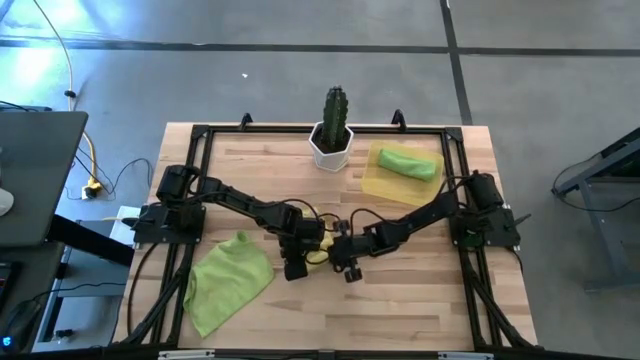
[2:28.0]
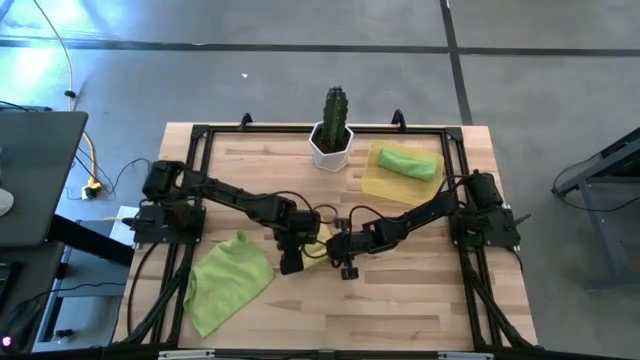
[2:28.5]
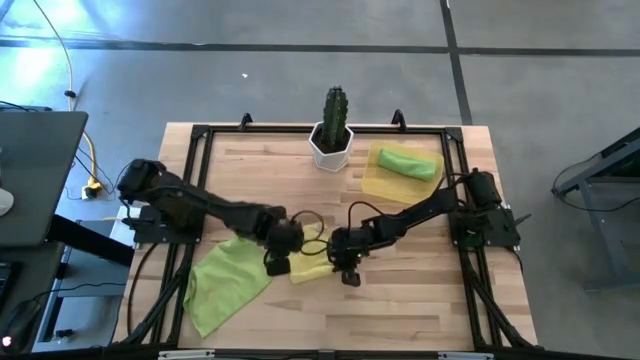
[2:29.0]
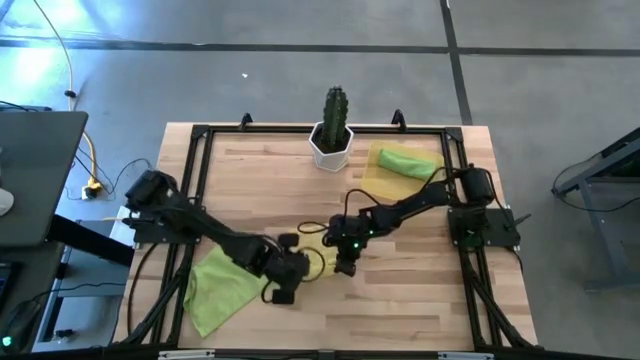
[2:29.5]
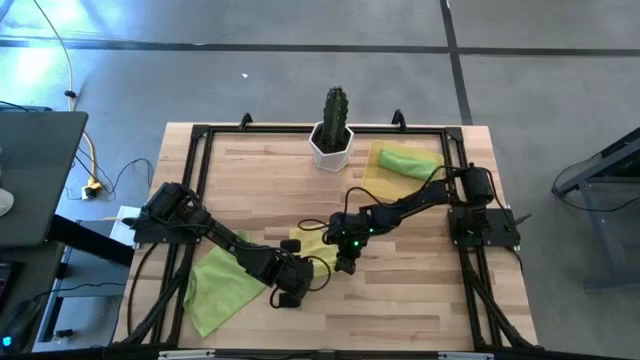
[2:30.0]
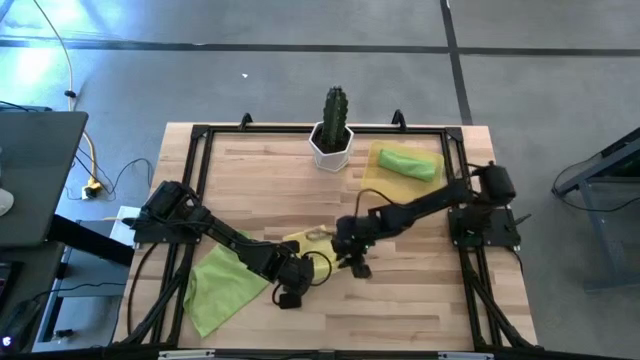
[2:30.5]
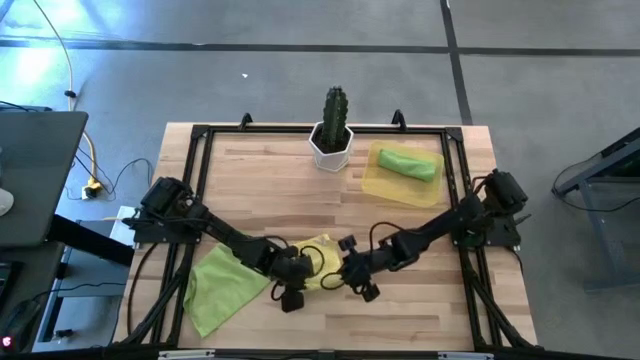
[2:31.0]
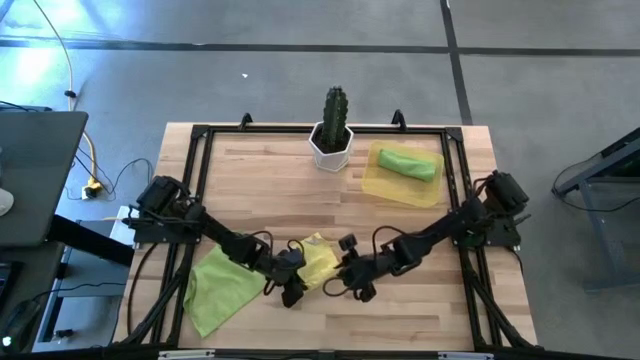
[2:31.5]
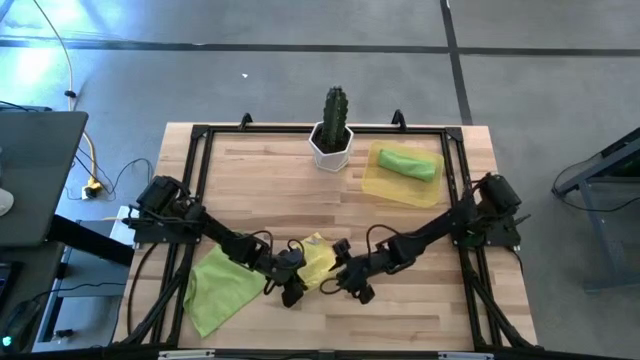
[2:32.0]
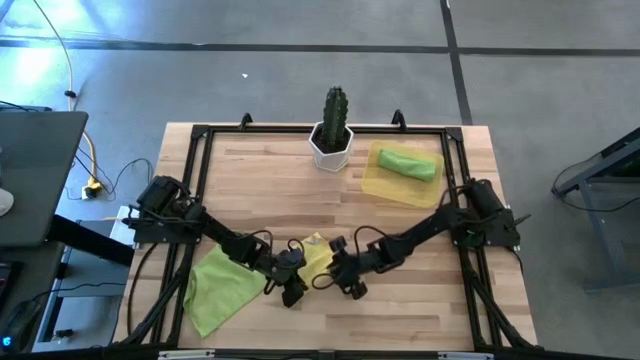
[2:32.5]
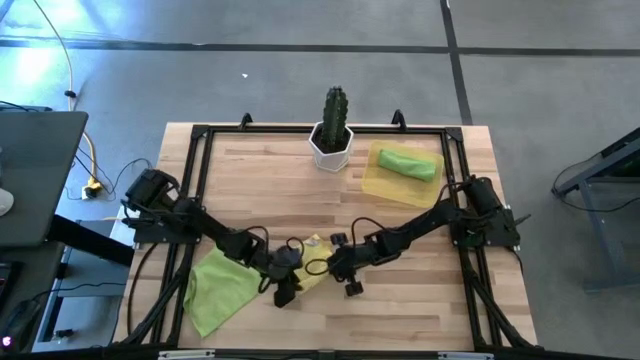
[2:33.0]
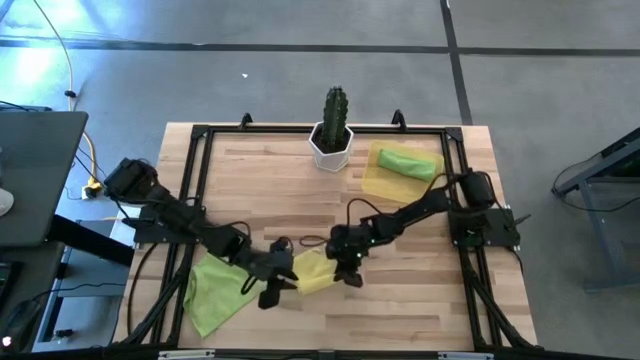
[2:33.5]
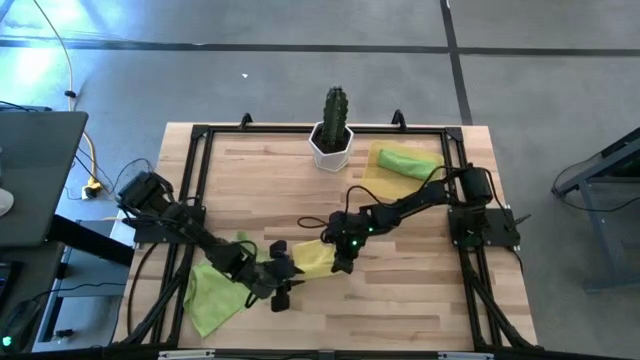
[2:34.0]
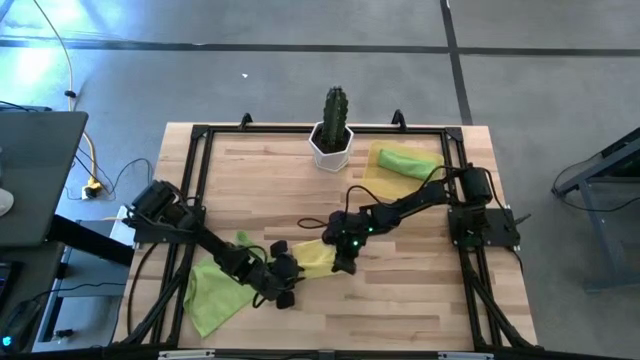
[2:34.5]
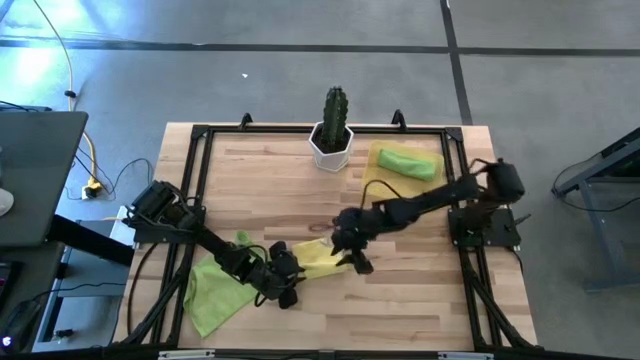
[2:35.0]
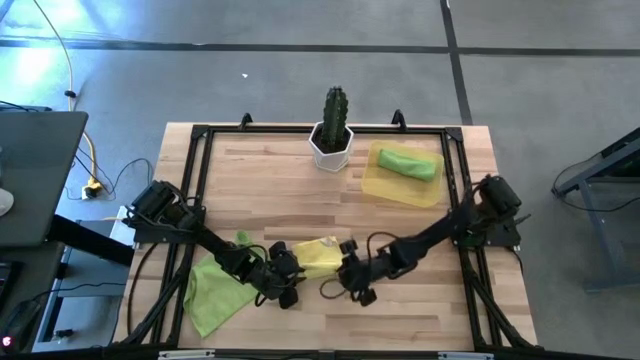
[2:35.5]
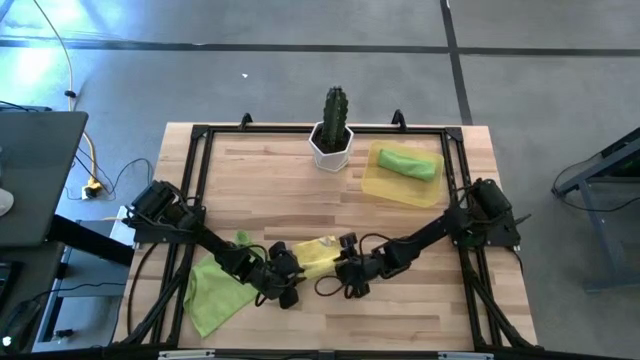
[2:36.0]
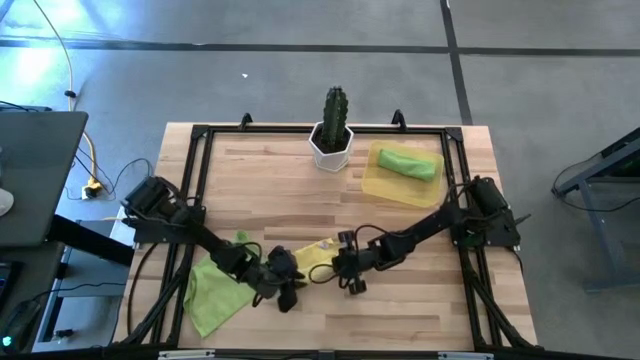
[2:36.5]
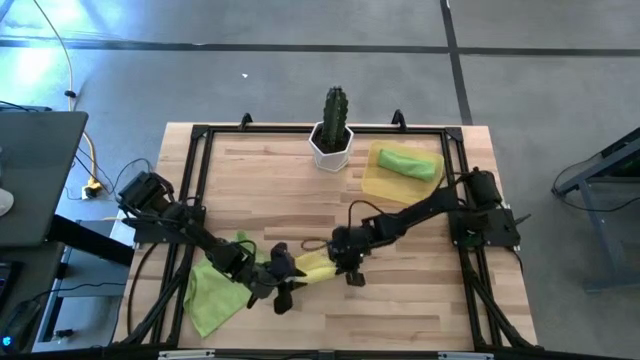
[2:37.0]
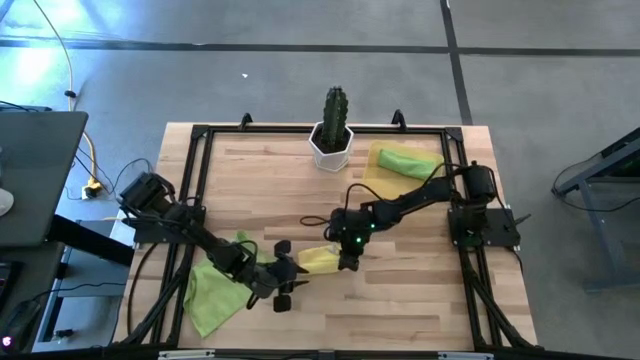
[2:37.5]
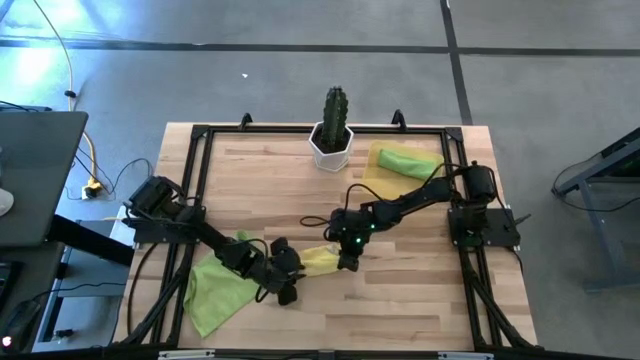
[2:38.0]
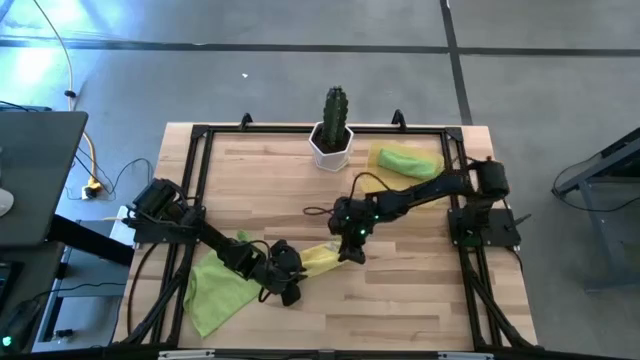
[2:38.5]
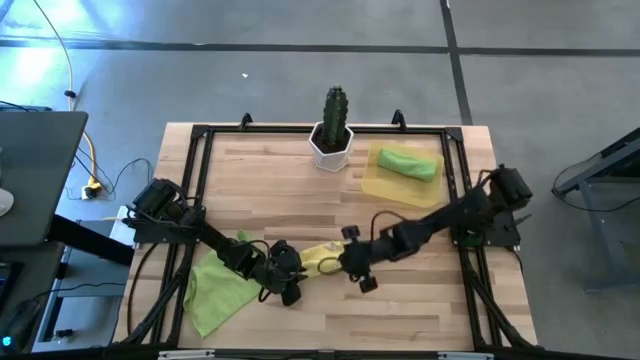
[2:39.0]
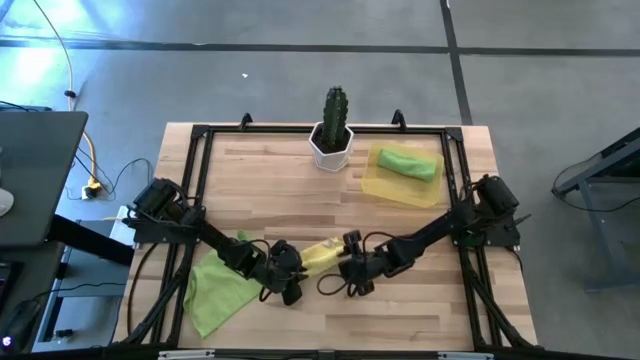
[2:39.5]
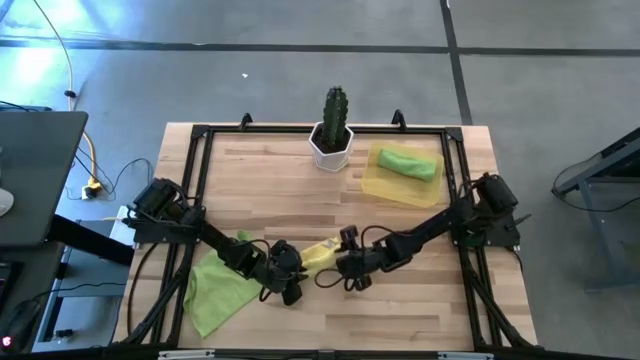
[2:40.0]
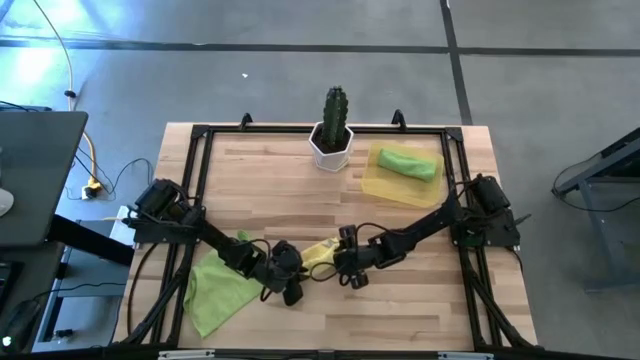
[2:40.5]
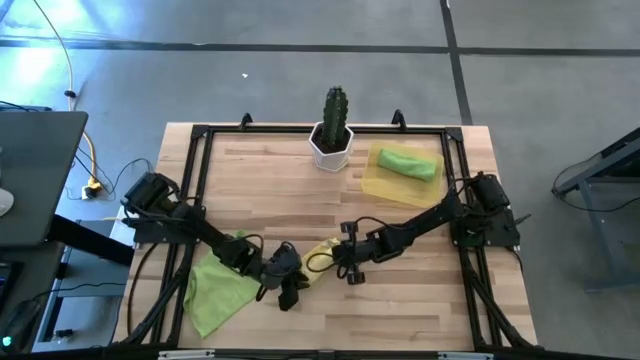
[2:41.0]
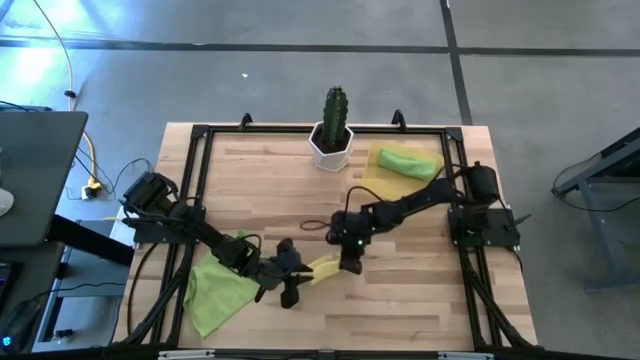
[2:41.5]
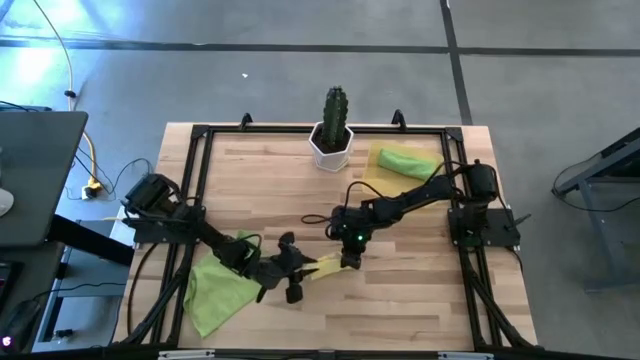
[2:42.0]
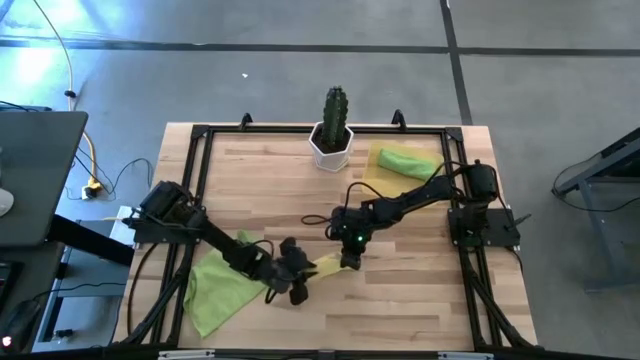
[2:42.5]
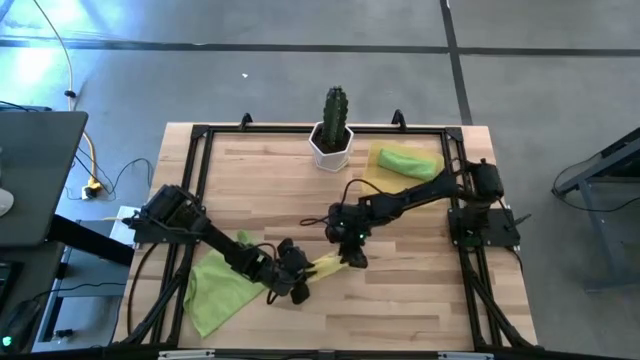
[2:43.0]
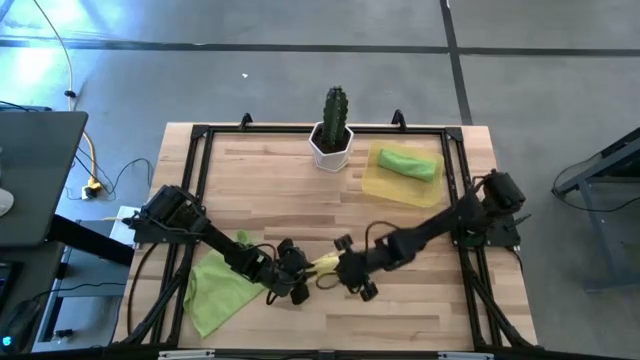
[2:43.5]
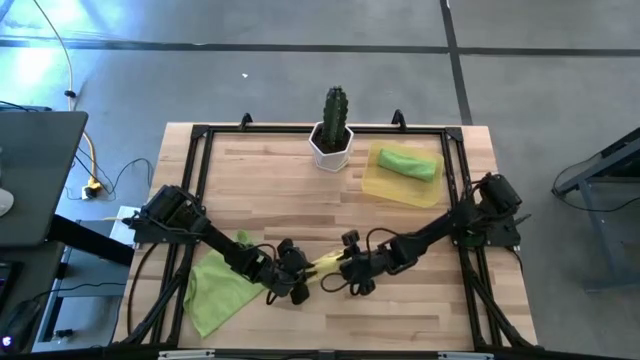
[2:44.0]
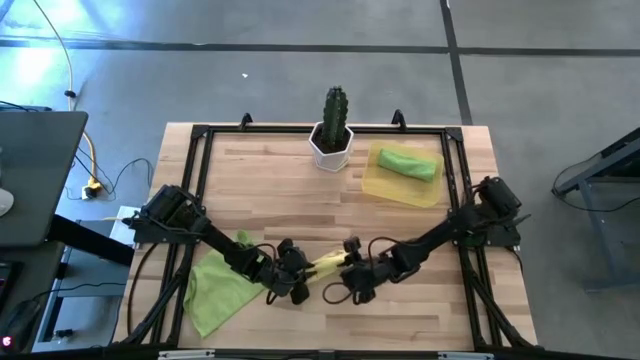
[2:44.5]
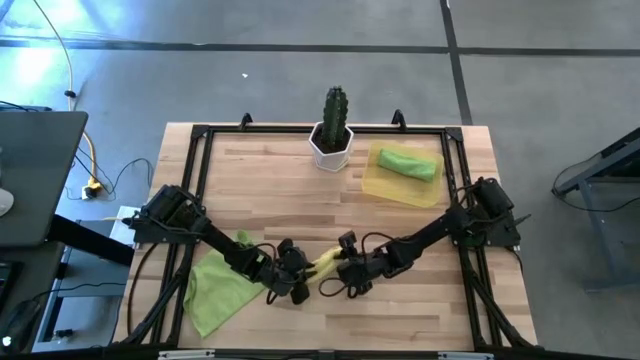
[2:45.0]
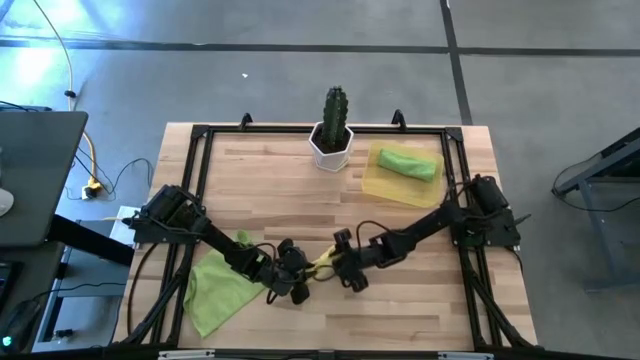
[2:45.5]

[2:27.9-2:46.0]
Task: Roll microfiber towels into tight, uniform cylinder then place into a basket
Roll the yellow towel

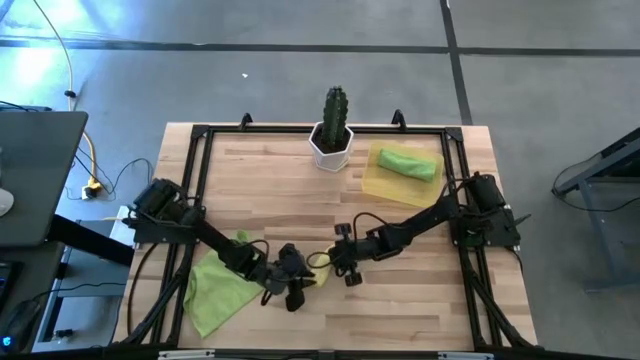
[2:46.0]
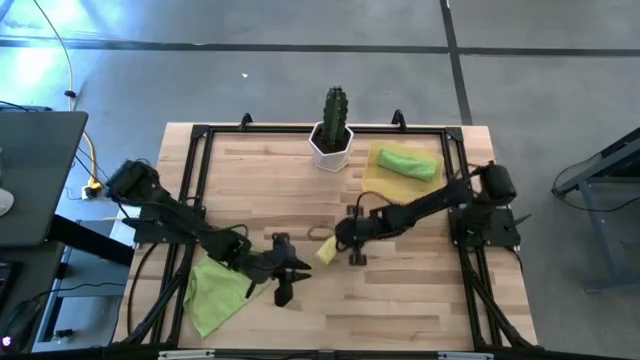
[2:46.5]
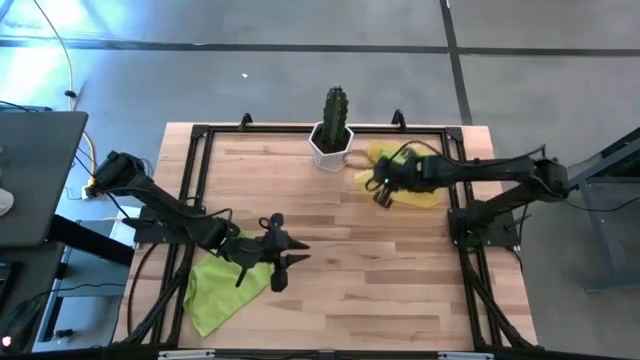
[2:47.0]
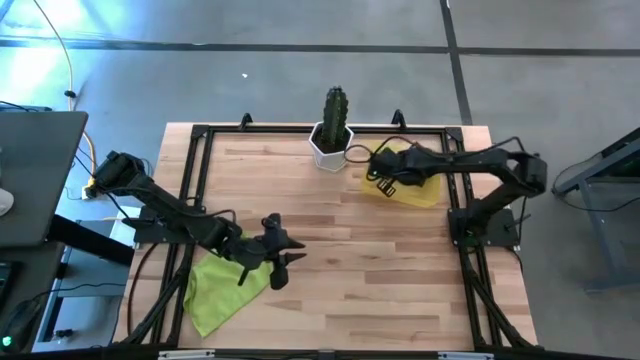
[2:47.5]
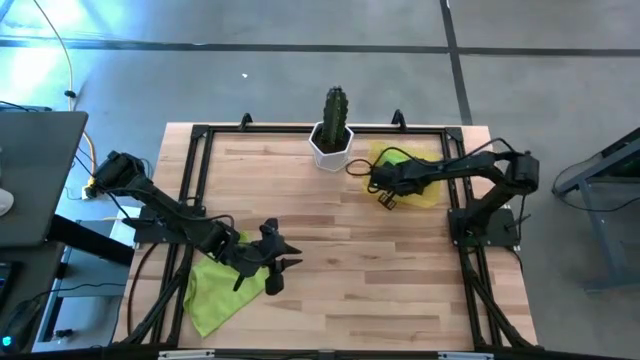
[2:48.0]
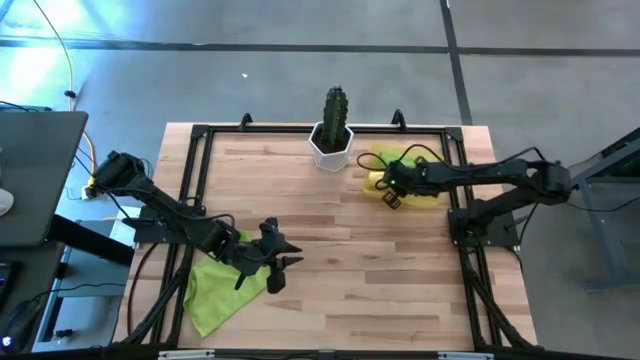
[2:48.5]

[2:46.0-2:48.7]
Put the yellow towel into the yellow bin
